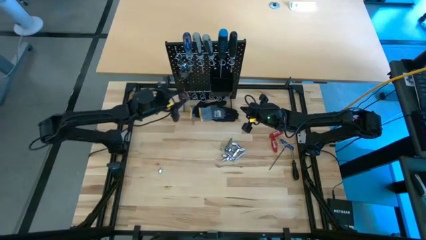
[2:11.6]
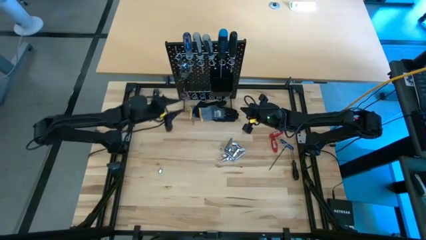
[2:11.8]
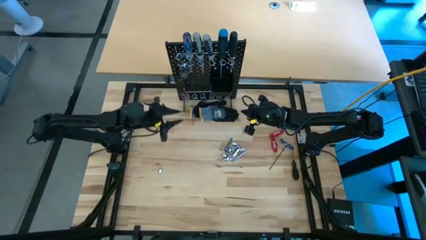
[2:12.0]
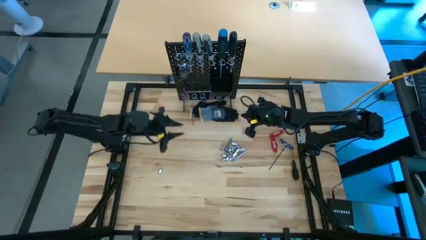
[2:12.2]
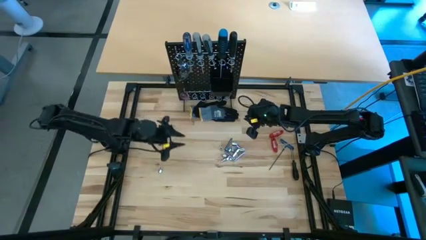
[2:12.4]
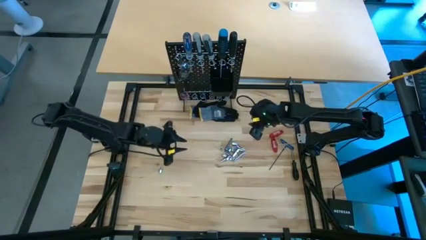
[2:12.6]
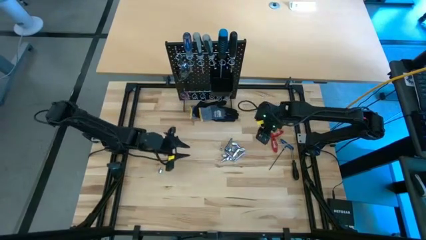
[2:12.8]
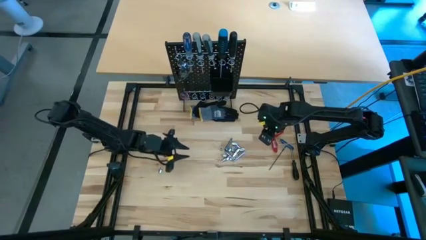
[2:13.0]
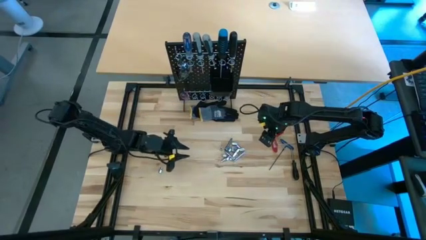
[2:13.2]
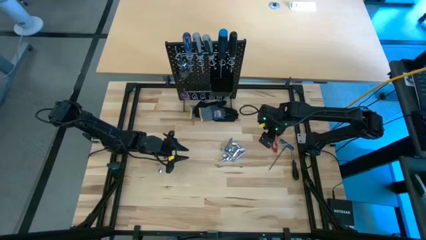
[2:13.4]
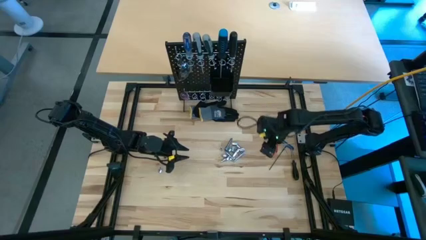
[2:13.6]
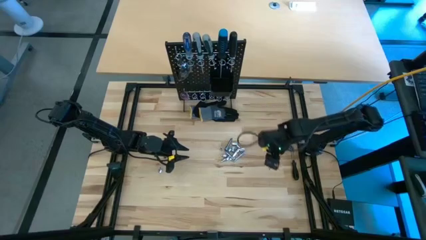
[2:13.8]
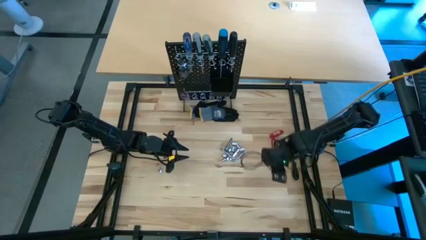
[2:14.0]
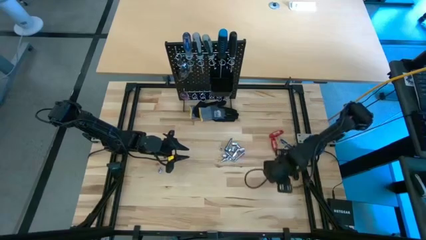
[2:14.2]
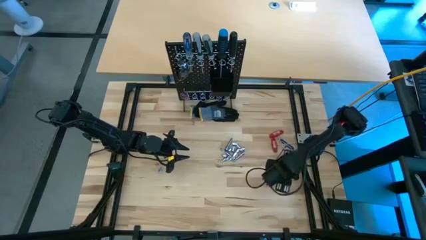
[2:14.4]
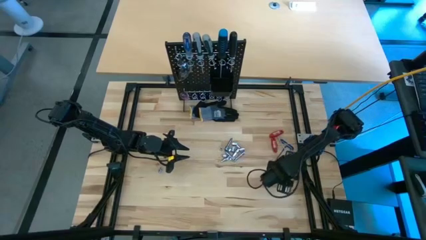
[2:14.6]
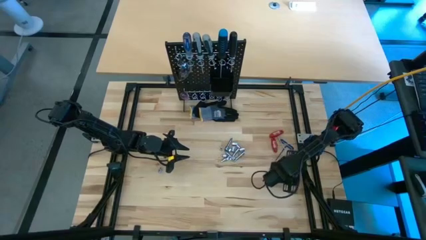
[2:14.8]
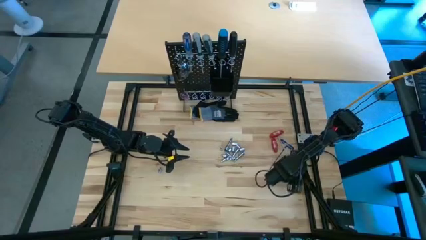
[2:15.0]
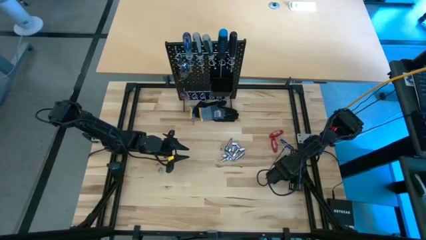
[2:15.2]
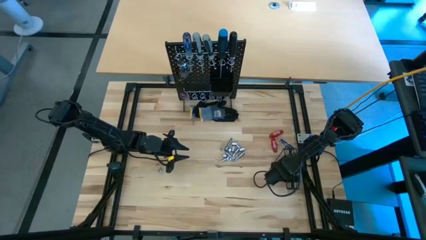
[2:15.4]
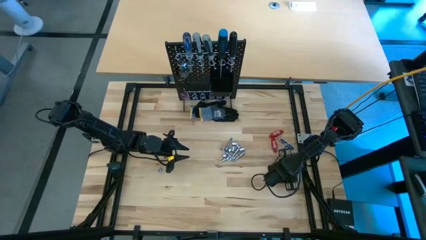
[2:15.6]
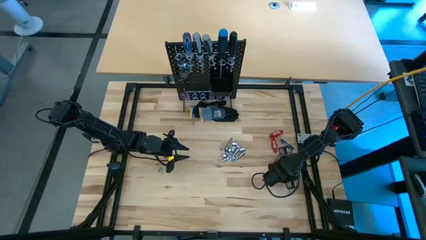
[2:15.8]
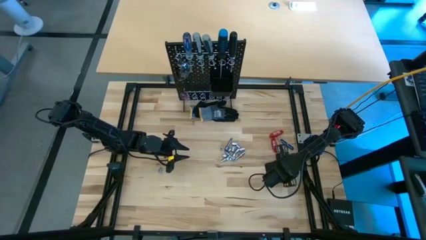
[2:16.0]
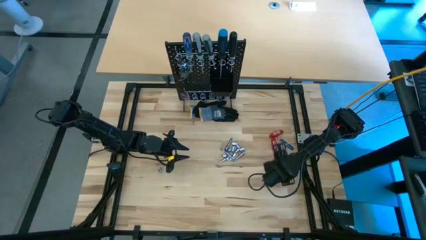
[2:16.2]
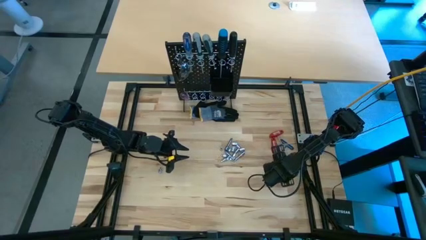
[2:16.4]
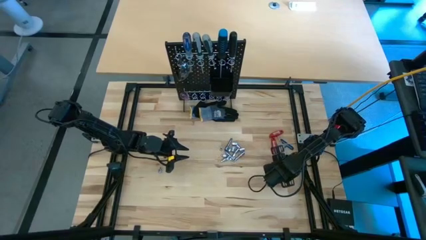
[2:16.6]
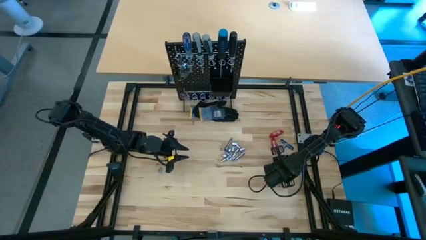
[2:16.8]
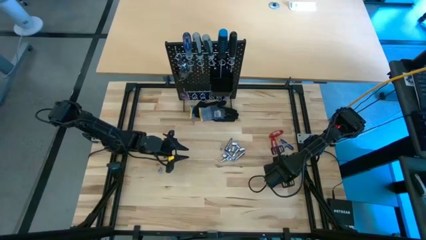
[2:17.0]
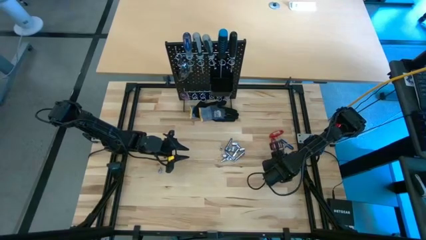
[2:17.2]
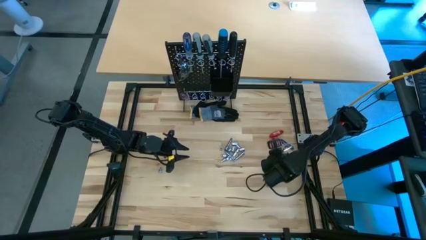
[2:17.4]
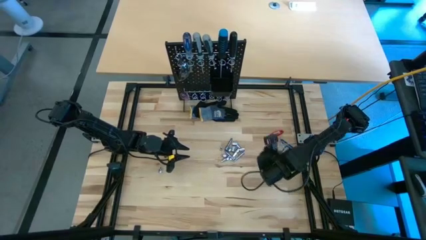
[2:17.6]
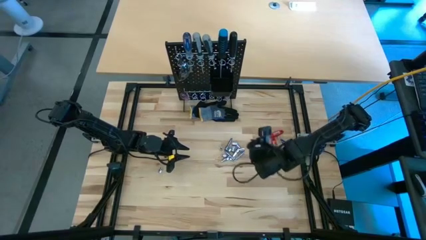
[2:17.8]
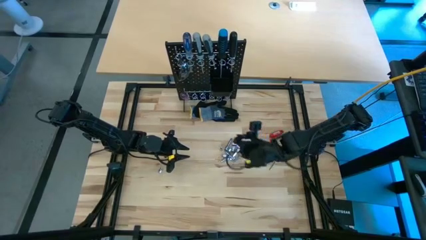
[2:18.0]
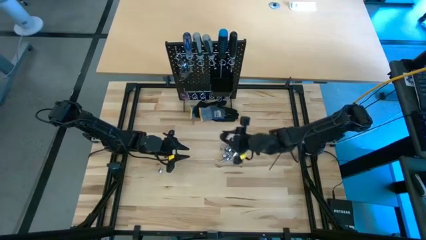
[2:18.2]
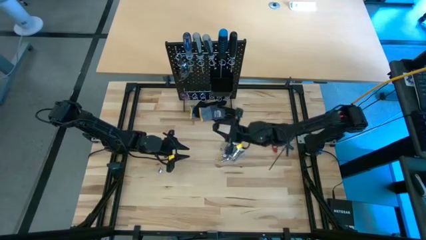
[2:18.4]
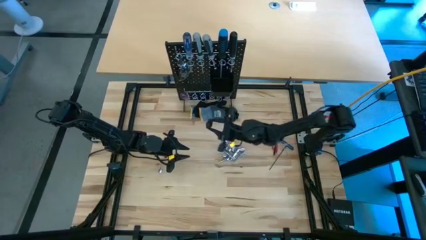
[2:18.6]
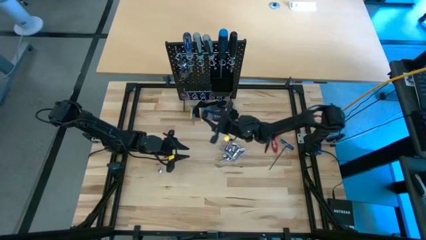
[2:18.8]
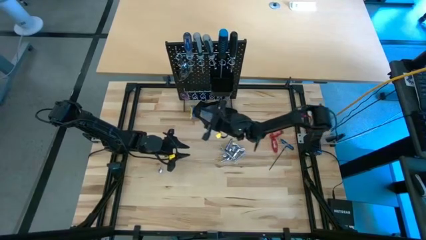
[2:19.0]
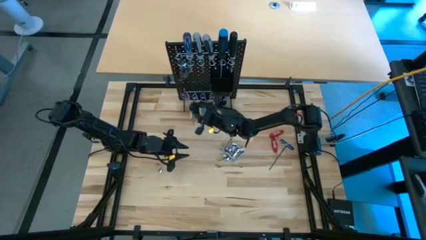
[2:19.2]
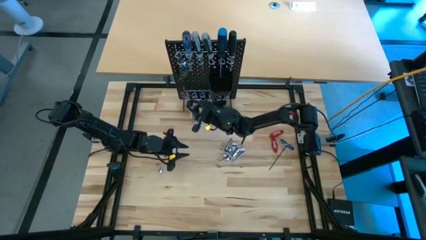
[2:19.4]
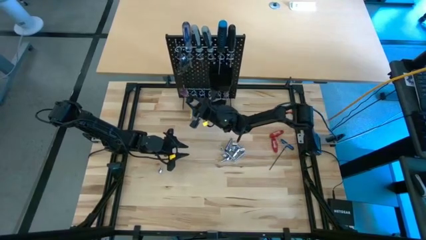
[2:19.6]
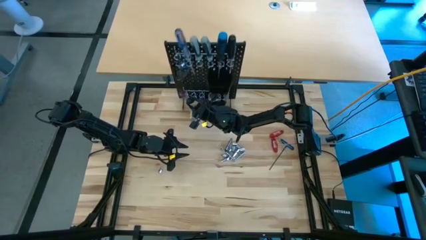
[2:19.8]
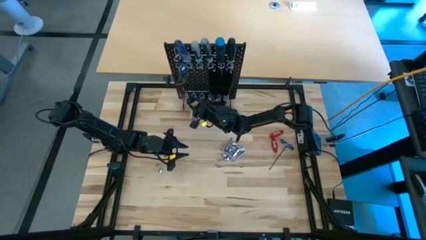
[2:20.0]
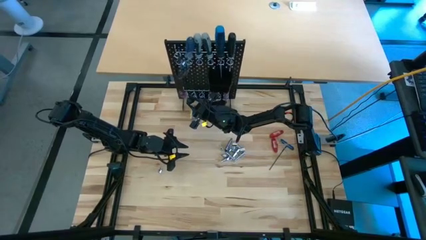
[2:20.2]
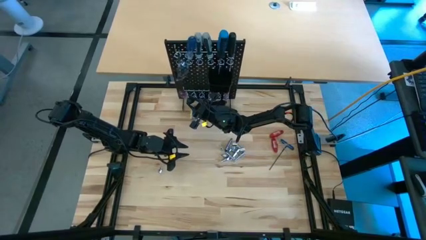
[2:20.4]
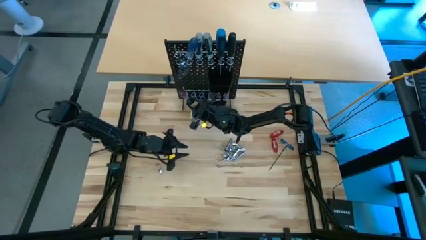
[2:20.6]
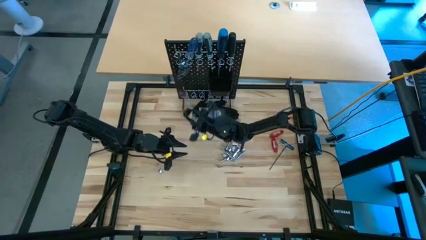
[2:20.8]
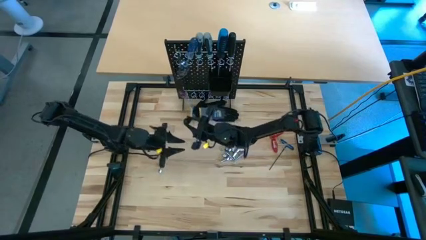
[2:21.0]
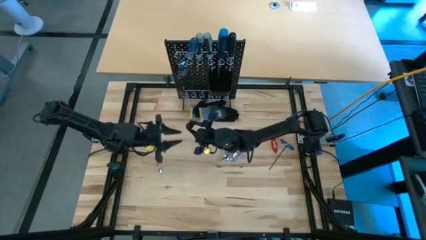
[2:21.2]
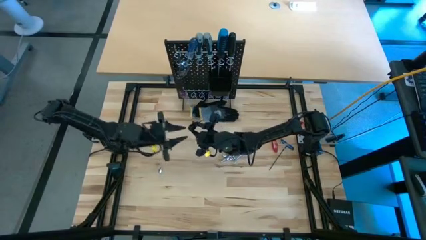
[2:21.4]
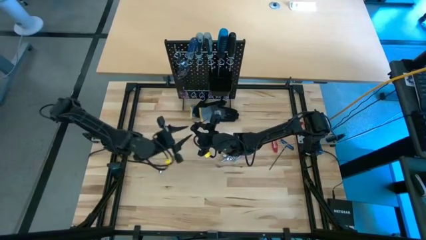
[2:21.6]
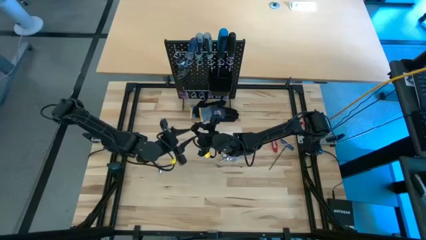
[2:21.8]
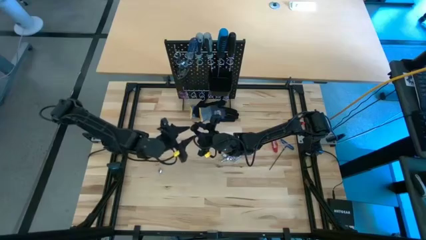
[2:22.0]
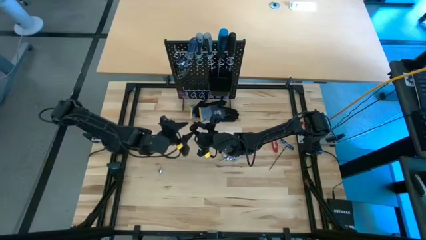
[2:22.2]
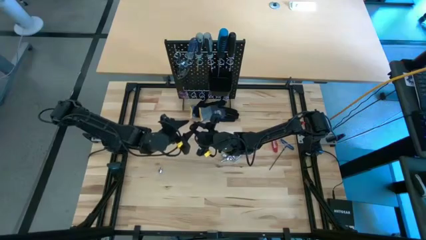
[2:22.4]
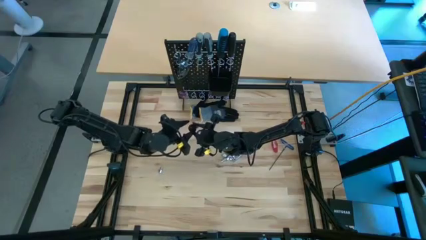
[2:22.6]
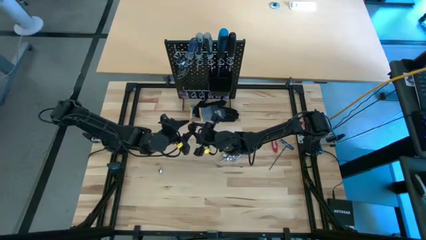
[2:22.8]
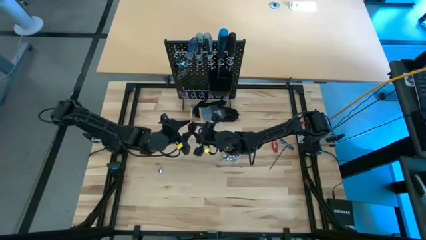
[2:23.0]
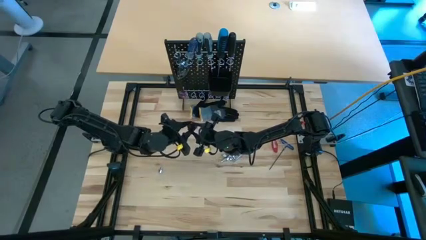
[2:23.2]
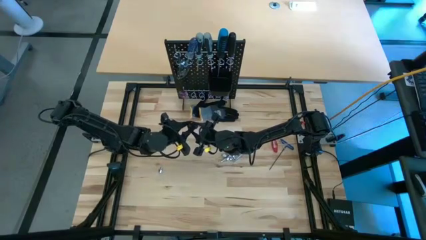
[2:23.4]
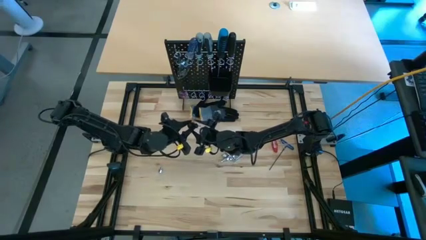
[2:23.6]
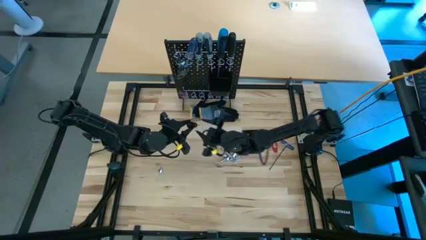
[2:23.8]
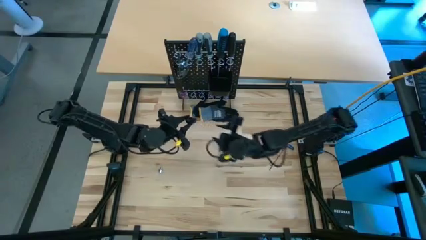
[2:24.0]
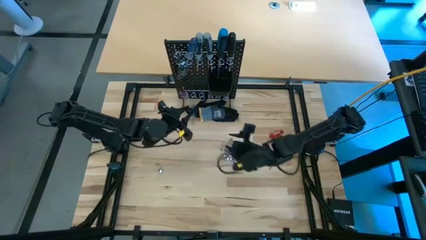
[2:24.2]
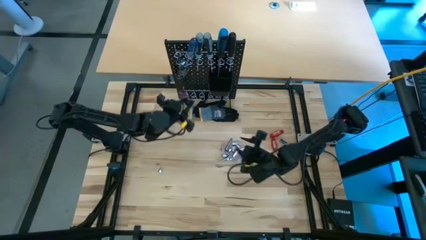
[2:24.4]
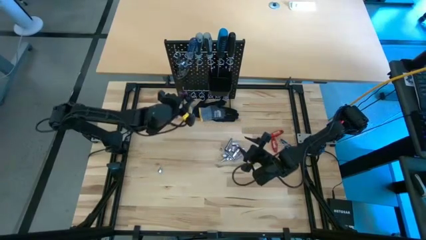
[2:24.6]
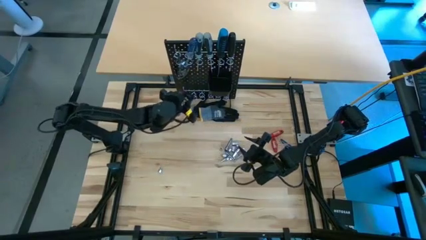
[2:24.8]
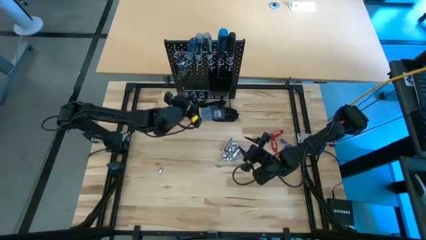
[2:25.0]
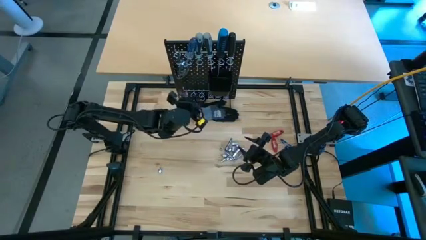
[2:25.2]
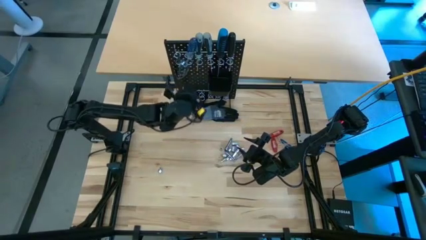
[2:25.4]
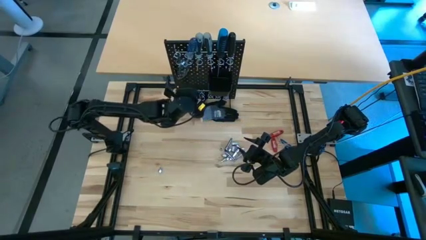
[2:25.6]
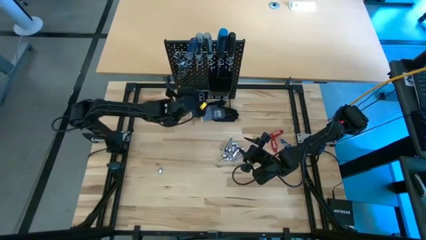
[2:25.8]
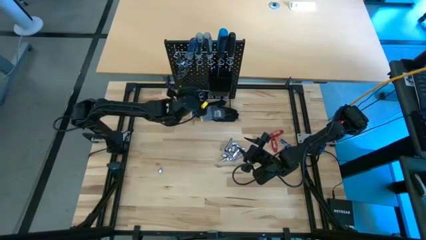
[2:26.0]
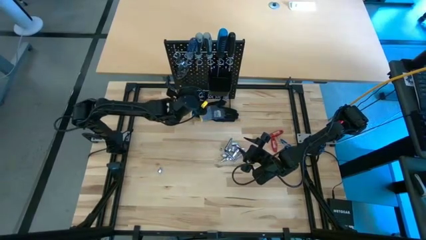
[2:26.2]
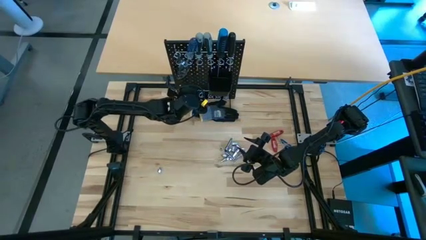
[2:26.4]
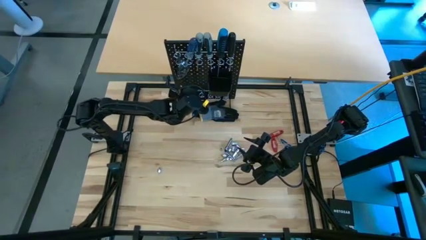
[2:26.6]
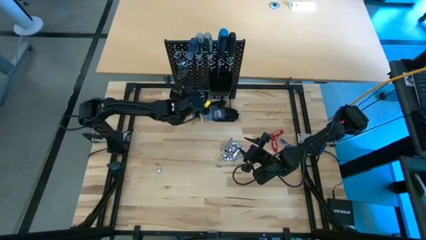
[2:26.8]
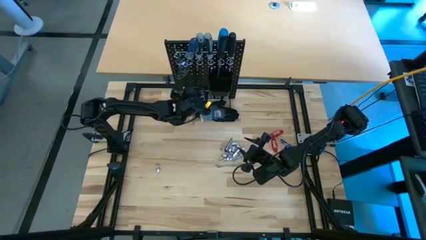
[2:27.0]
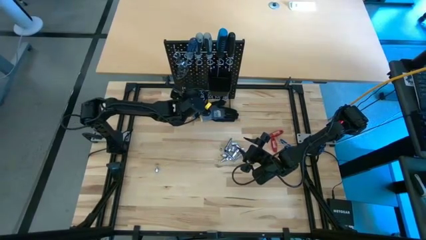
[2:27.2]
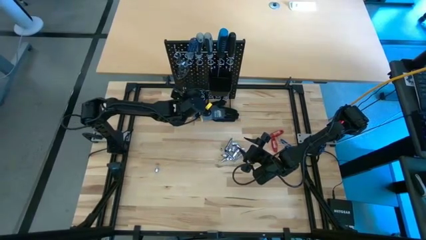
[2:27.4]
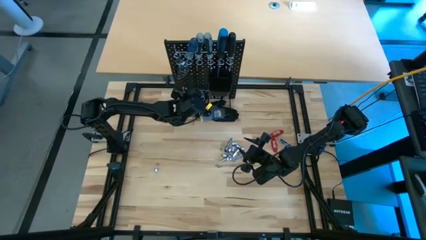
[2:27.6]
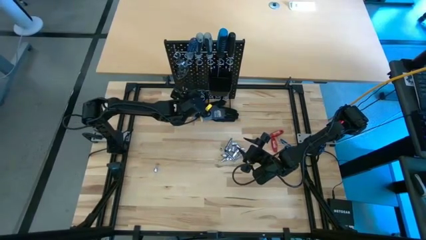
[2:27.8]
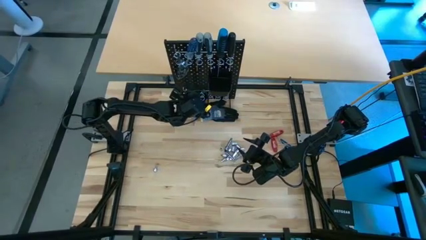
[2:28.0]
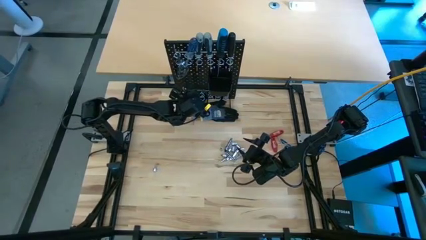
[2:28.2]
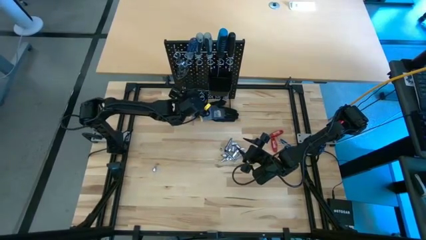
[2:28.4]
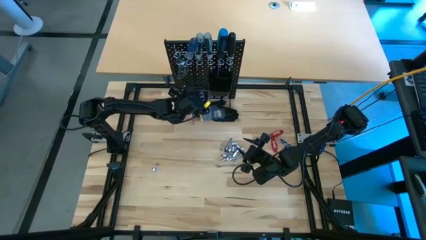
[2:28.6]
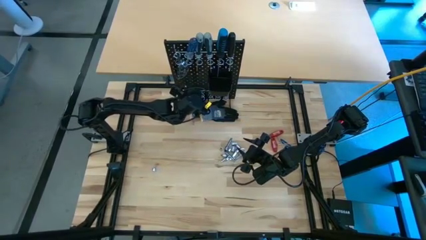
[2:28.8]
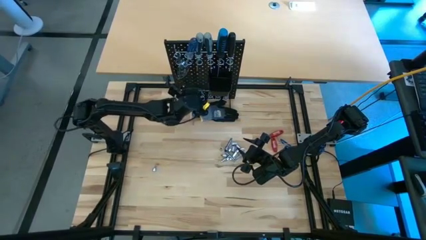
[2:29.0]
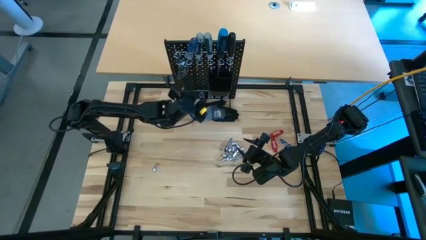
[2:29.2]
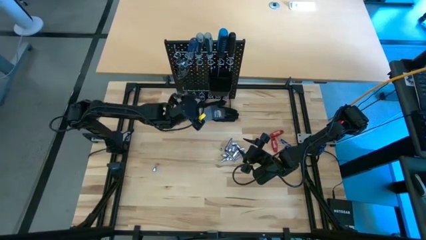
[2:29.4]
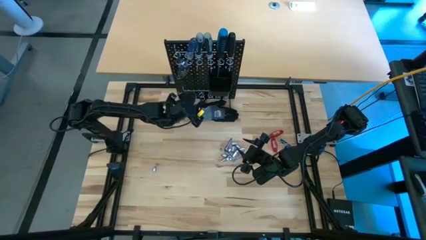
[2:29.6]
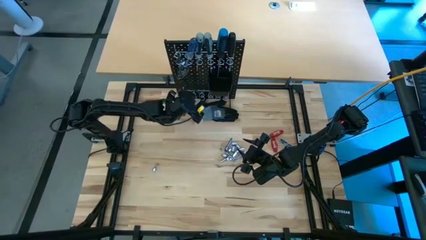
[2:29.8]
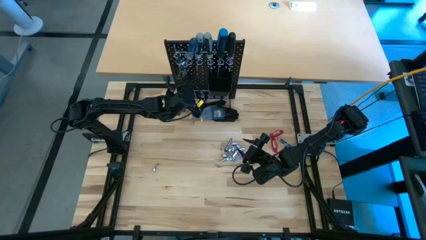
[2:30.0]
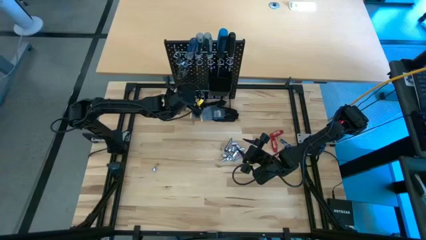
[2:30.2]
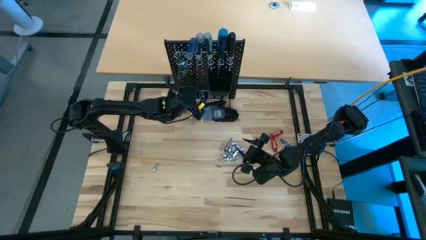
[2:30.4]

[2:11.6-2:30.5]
Task: Hang tools onto peg board
Hang the black screwdriver on the pegboard
